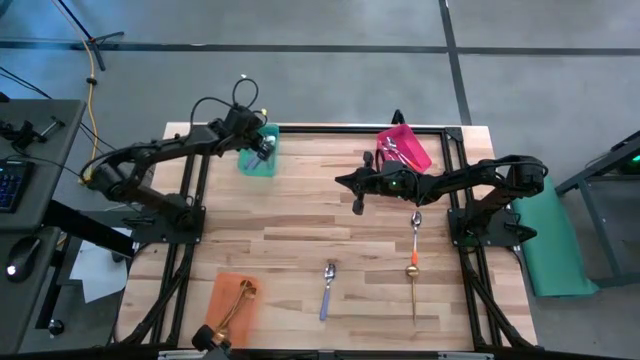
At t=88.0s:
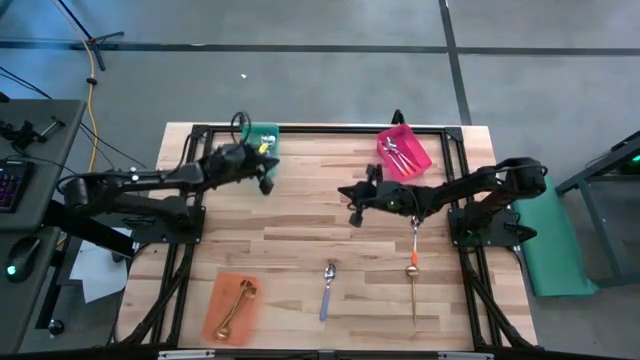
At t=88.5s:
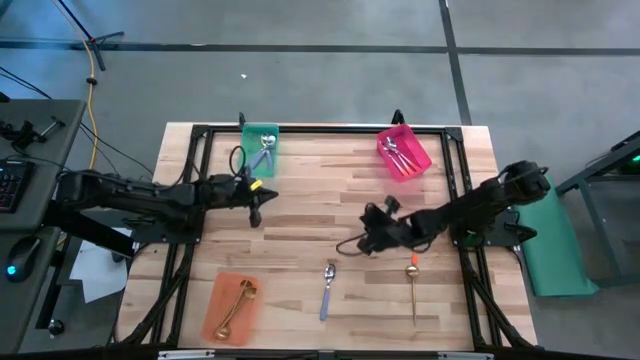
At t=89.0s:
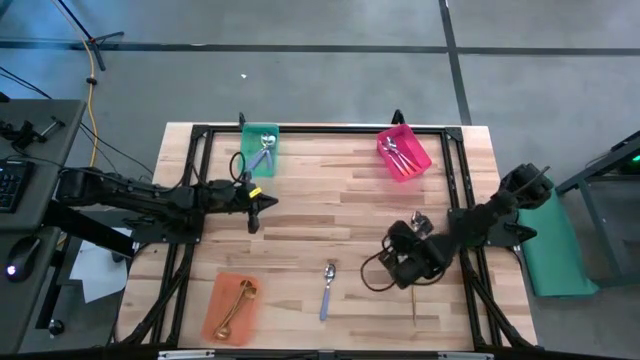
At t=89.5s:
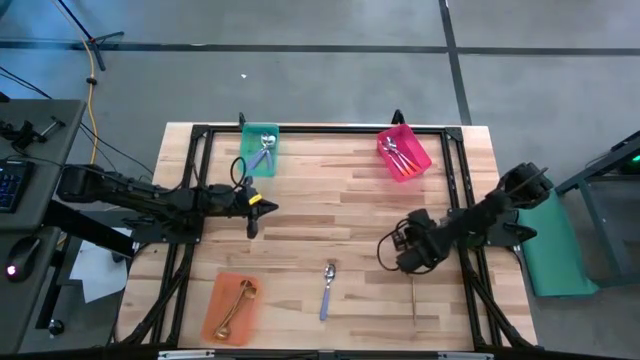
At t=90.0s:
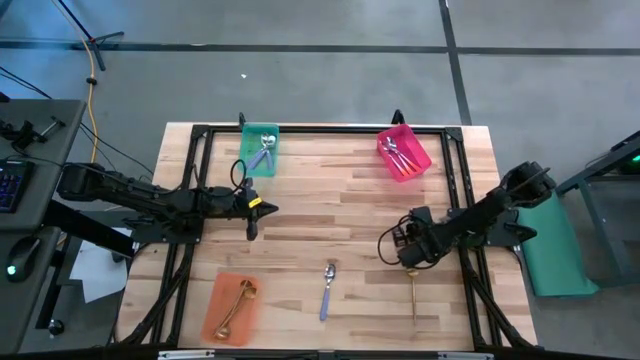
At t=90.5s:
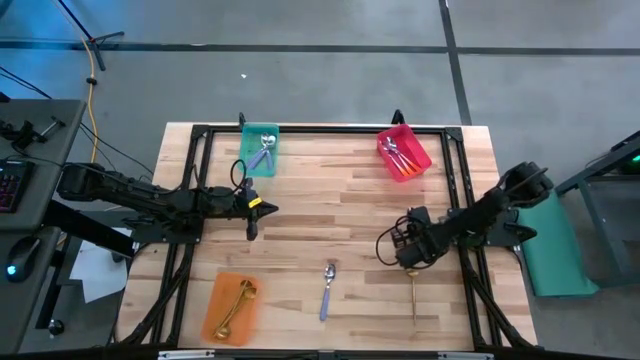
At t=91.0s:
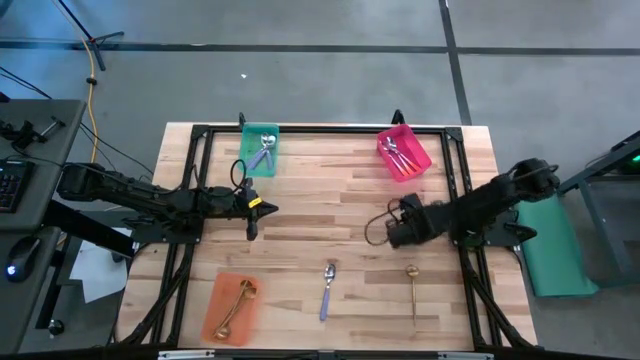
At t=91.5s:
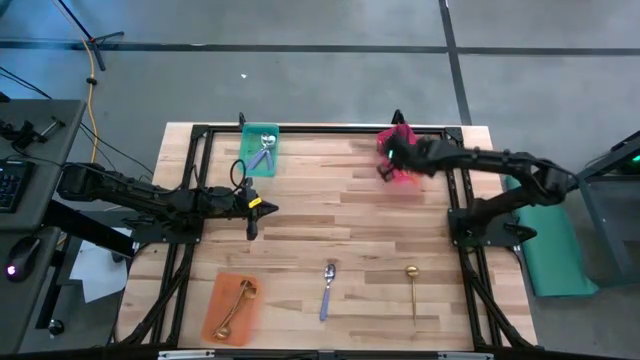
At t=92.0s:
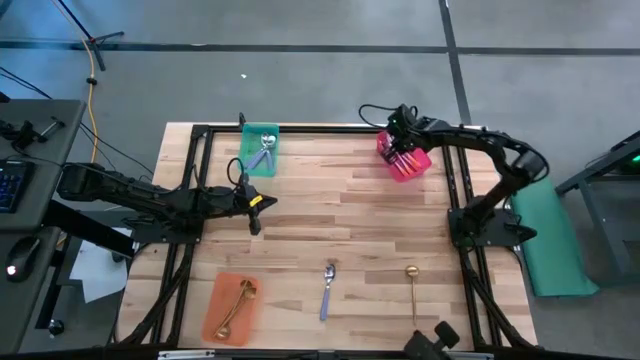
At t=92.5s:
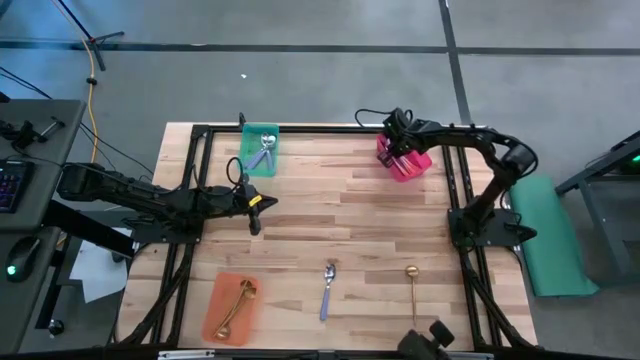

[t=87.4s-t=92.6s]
Task: Sort silverware by color (type)
Put the orange spoon into the pink bin

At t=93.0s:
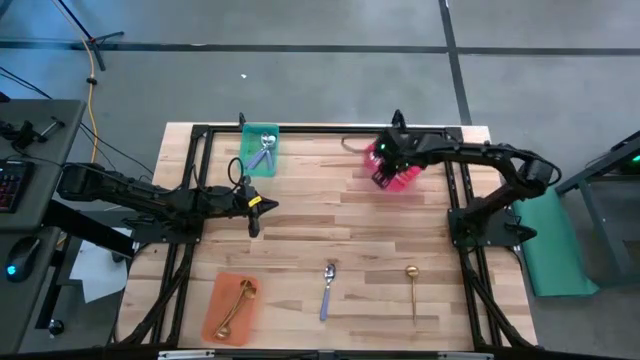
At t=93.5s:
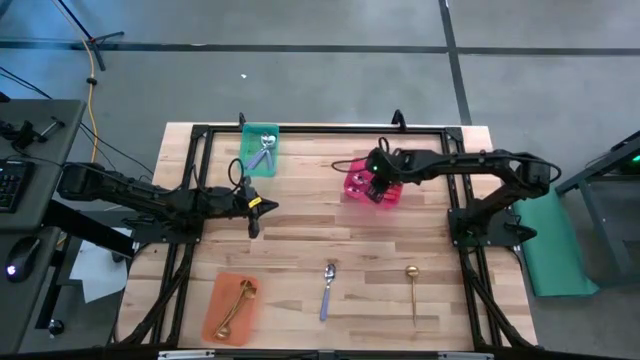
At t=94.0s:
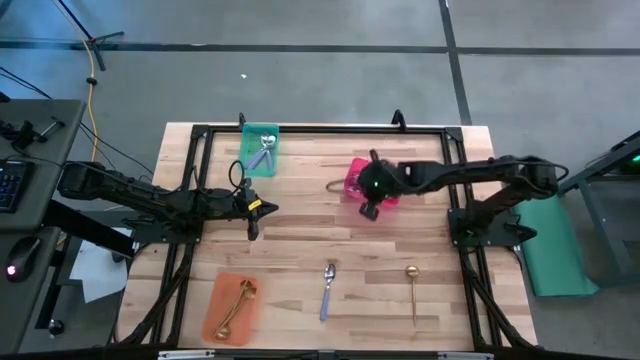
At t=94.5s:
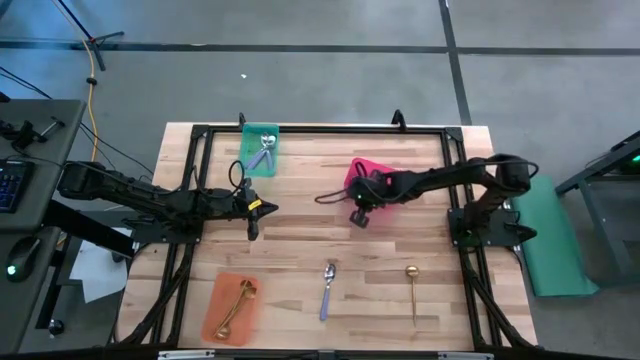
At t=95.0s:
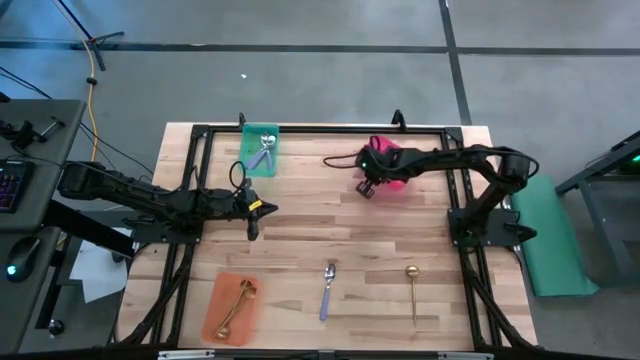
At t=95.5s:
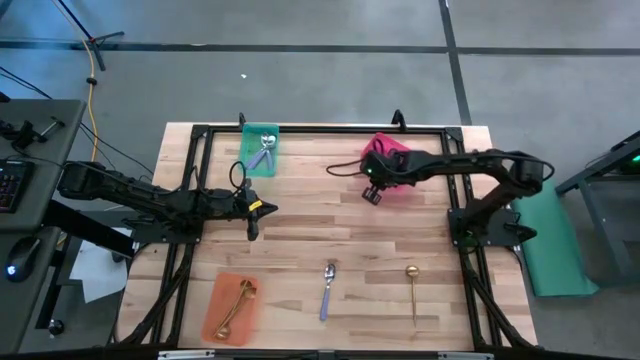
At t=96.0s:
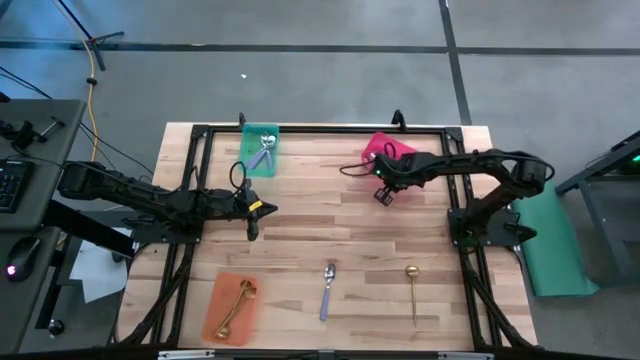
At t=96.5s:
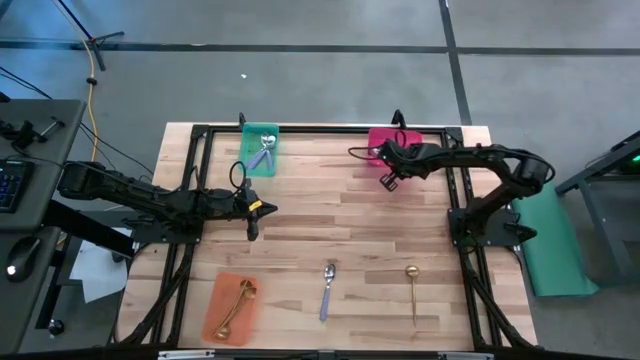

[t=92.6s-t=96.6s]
Adjust the pink bin on the table

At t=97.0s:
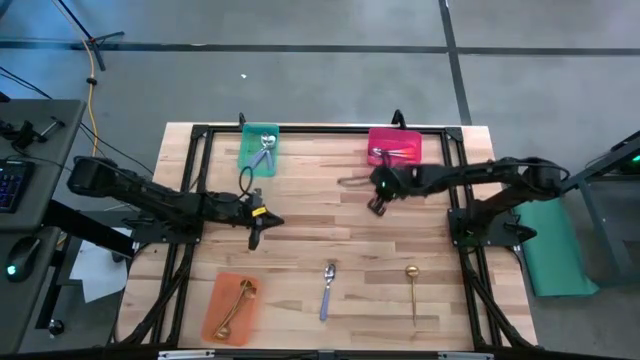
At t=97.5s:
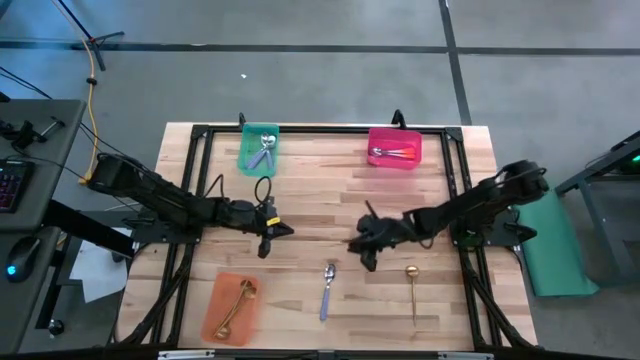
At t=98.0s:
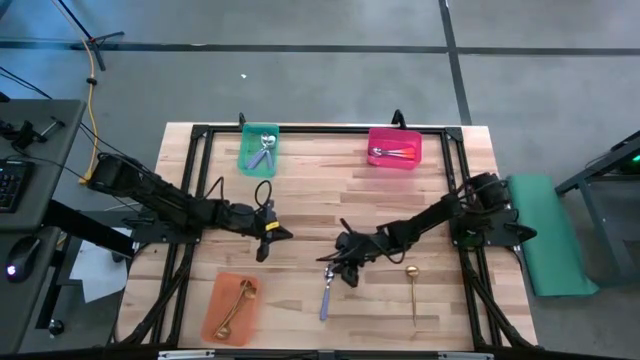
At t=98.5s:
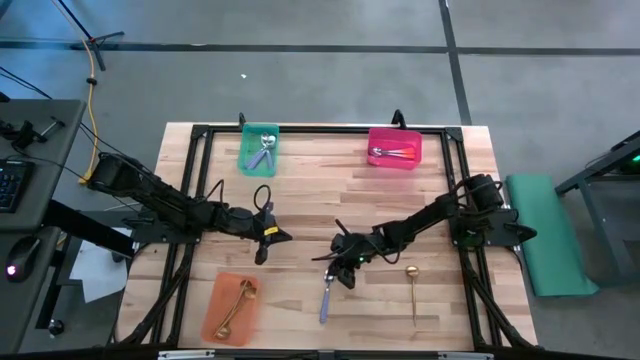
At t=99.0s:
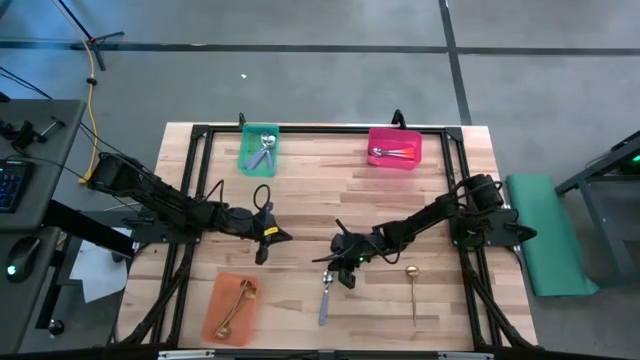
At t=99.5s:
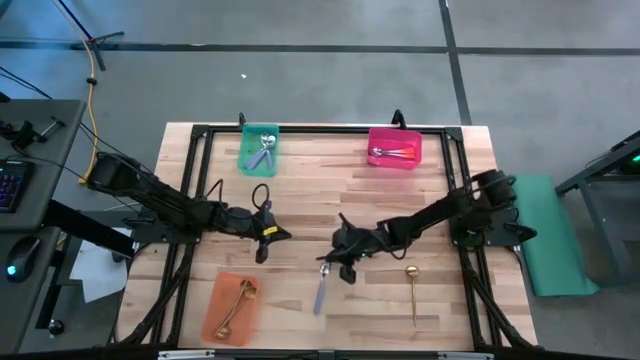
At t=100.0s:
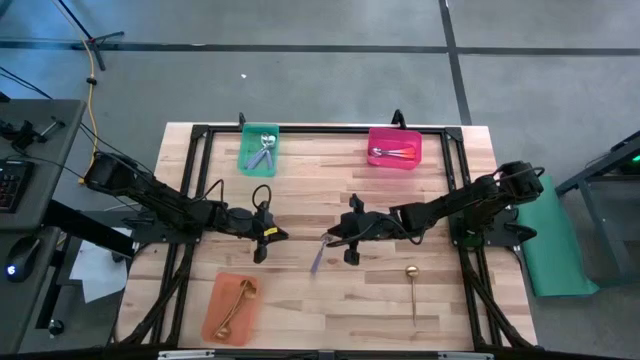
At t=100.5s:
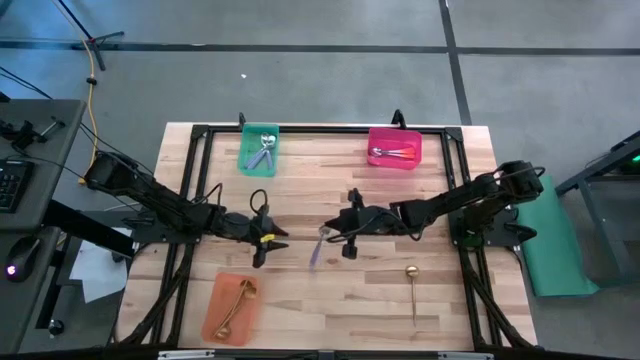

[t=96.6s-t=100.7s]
Put the purple spoon into the blue bin

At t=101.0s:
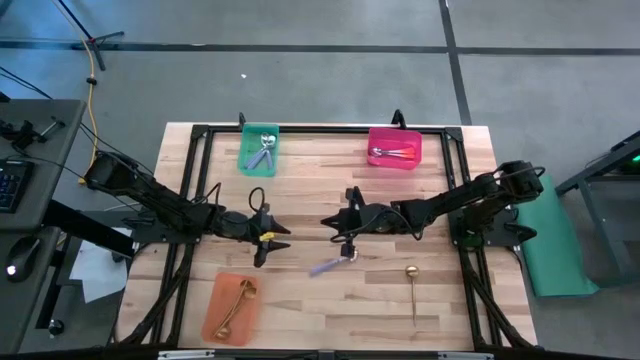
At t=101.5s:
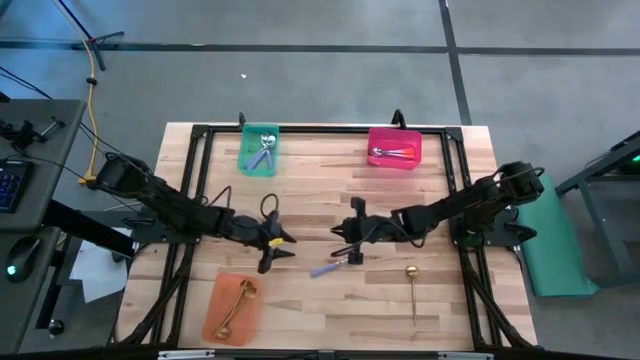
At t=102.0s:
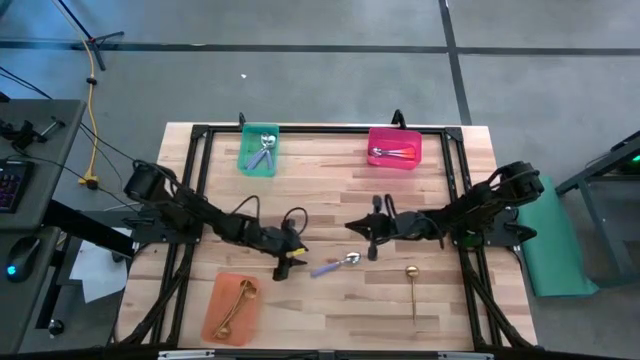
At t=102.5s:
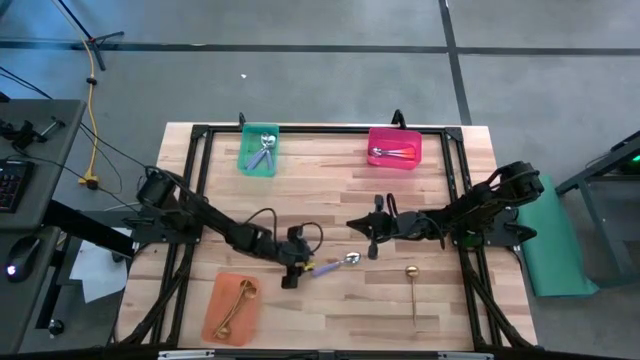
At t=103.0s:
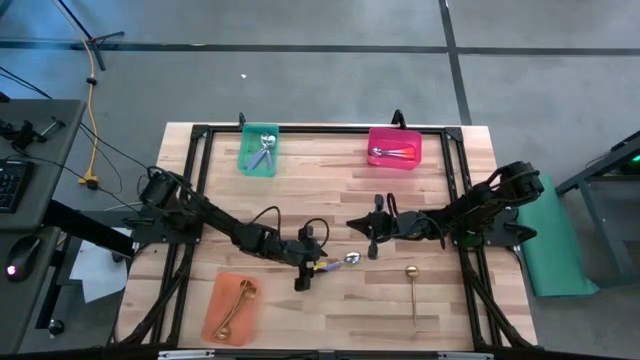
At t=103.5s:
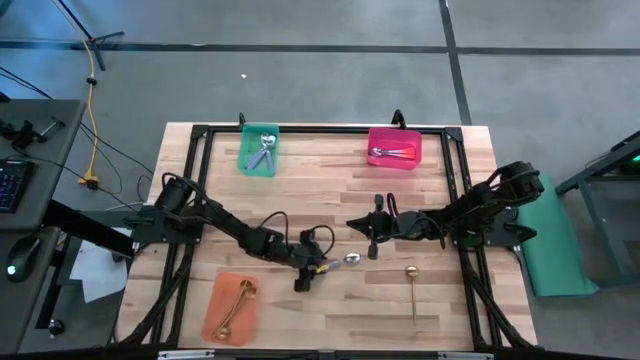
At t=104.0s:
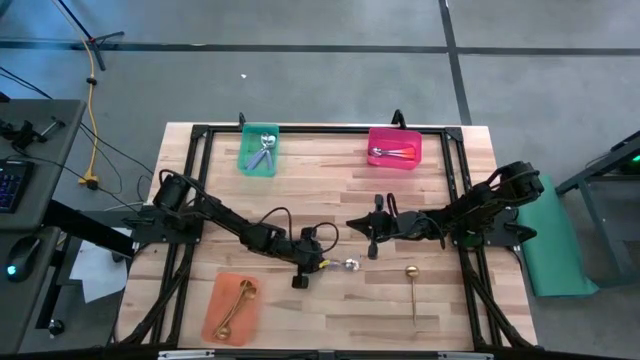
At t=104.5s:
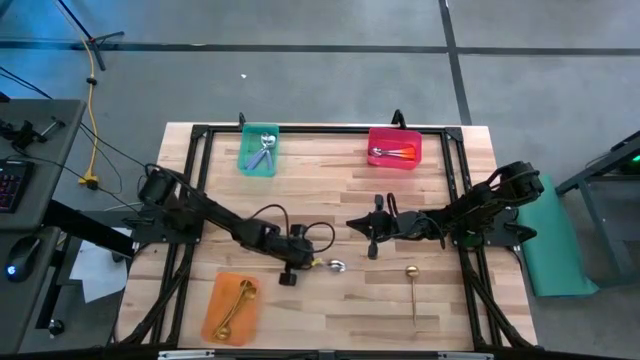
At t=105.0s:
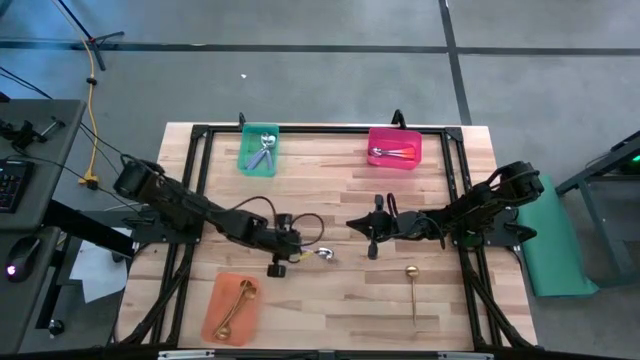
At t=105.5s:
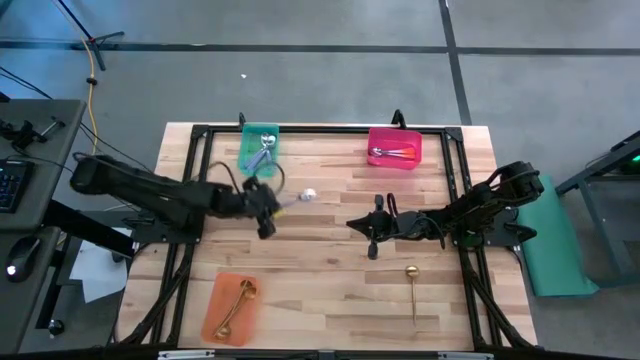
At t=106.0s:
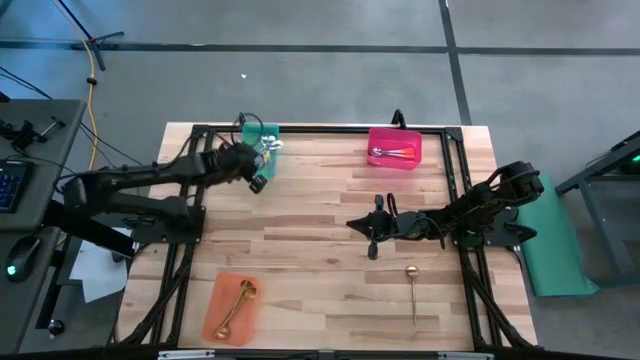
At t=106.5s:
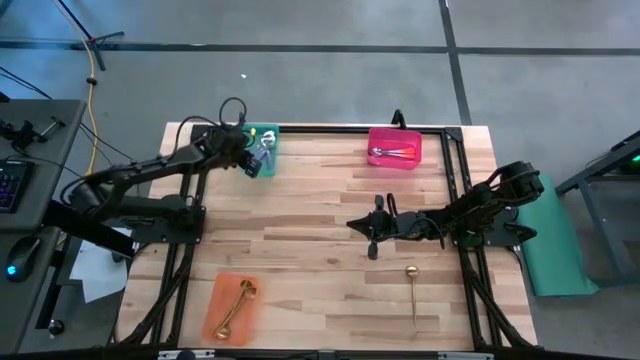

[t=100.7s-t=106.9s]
Put the purple spoon into the blue bin

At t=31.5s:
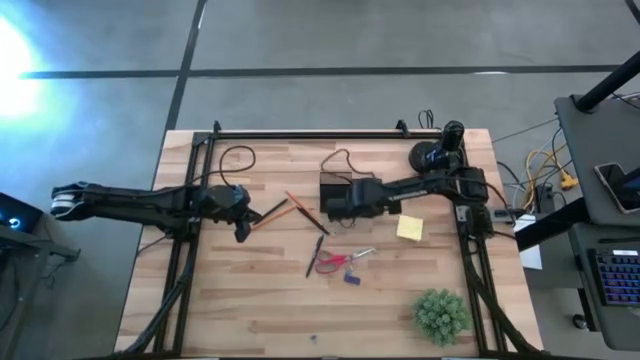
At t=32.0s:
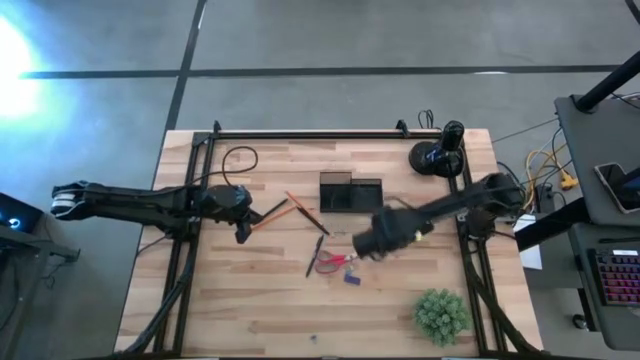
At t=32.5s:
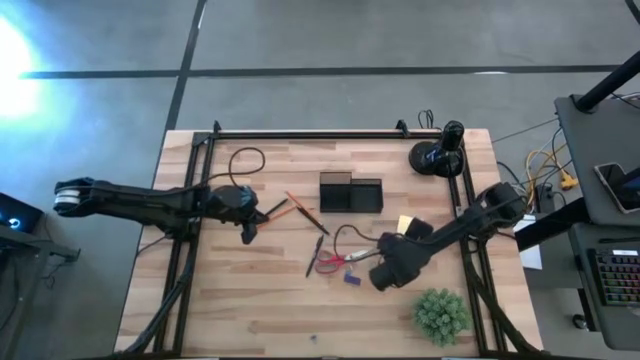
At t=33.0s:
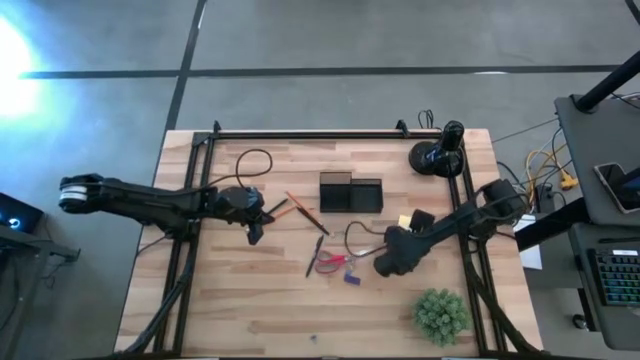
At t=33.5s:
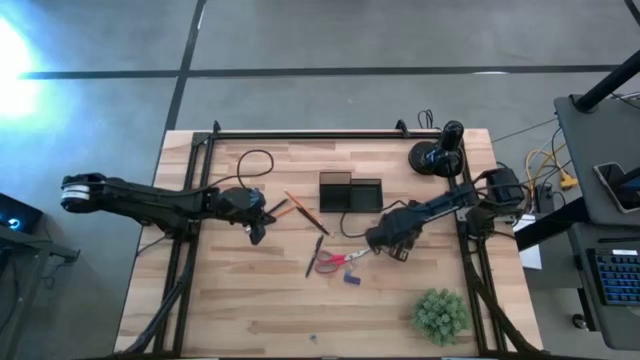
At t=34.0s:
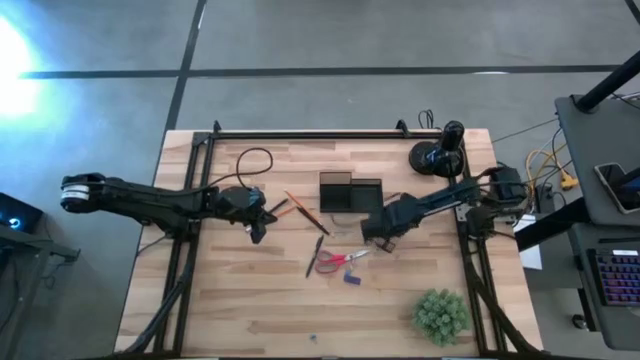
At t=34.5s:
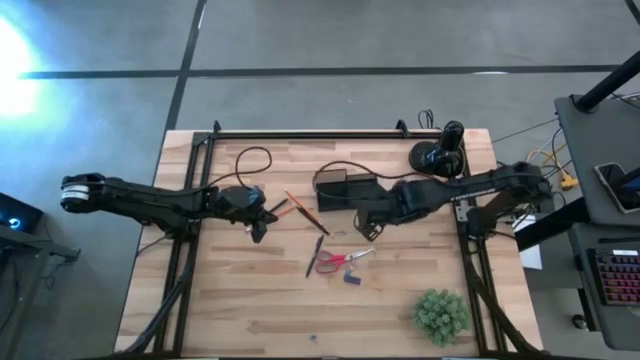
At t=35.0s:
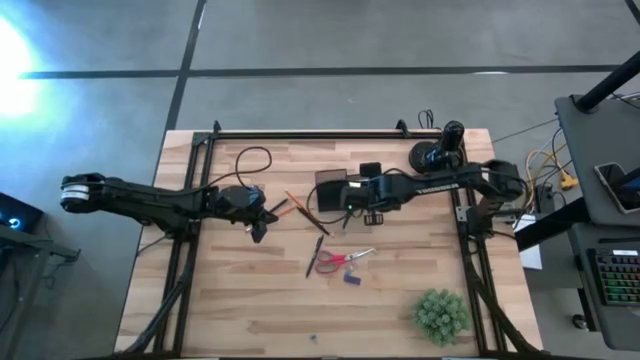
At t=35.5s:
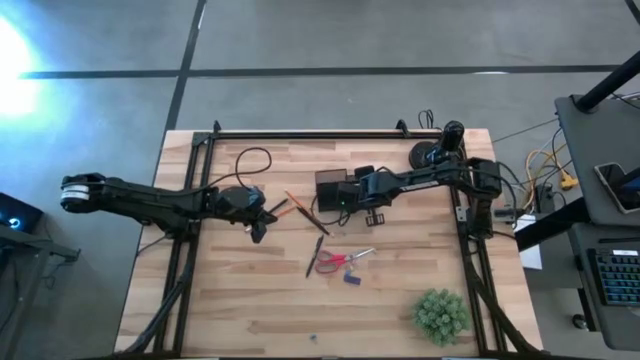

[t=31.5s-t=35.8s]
Task: Pick and place office supplies into organizer
Put the sticky note into the desk organizer
